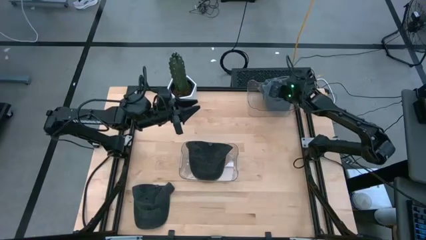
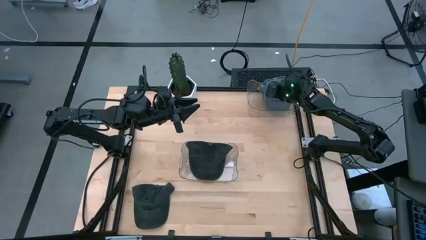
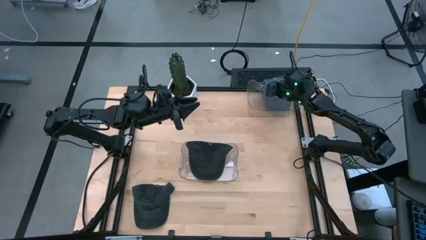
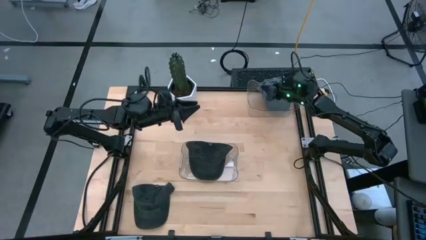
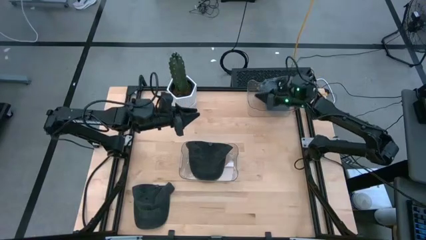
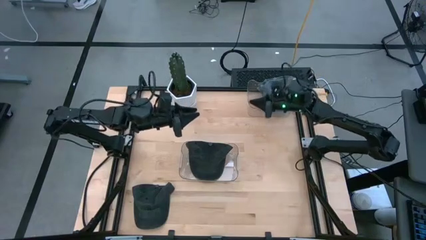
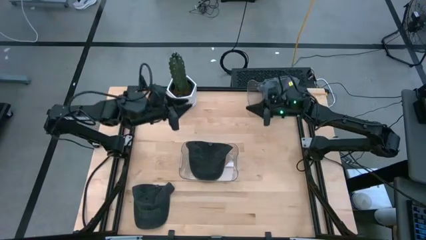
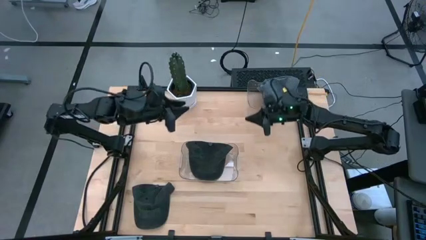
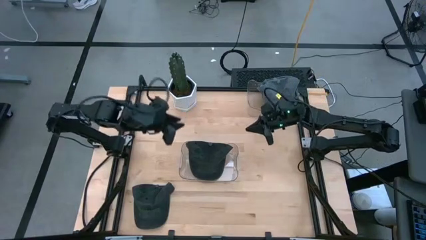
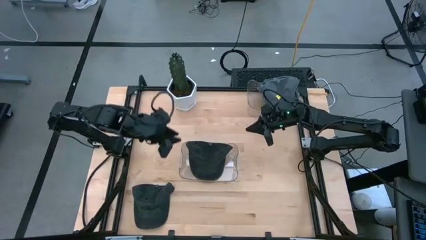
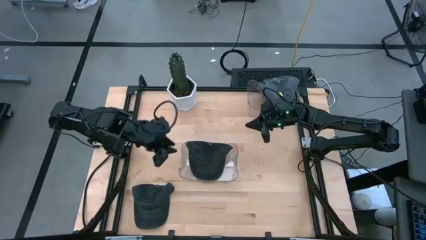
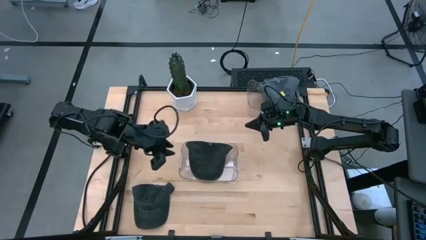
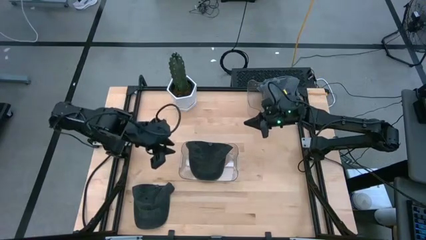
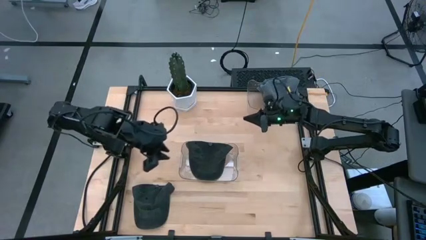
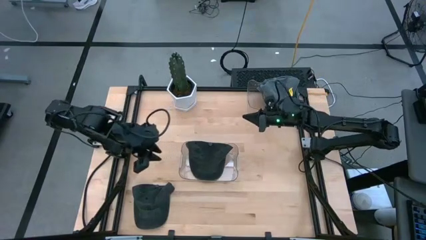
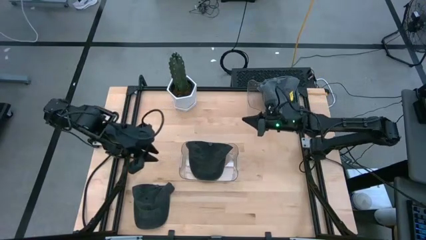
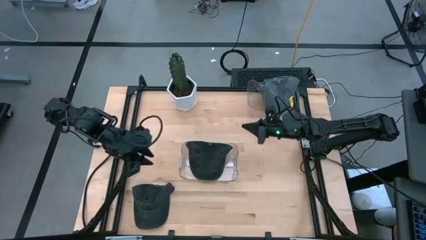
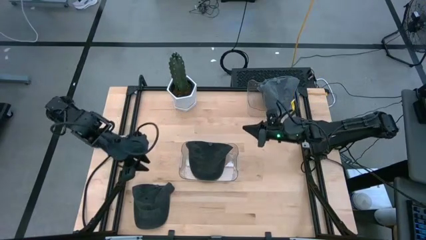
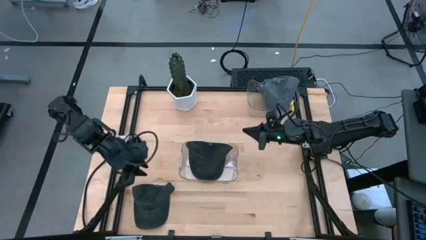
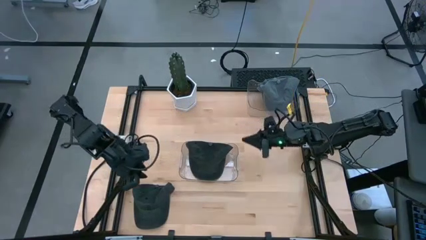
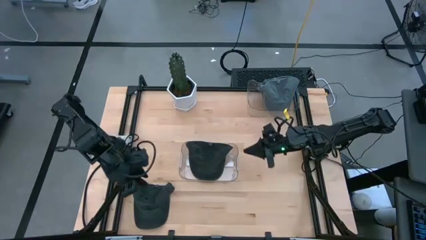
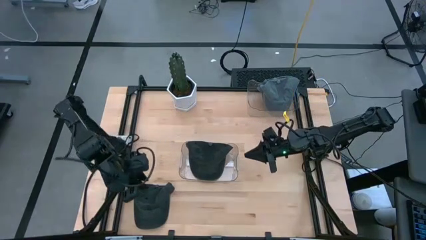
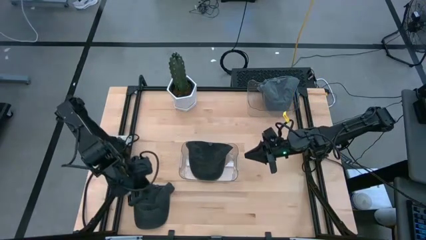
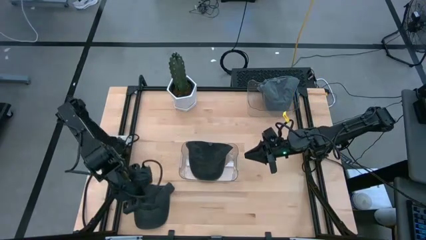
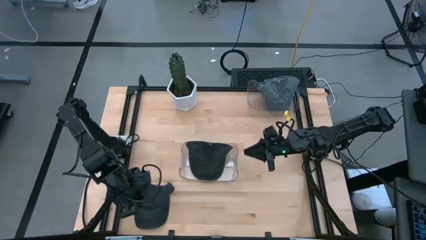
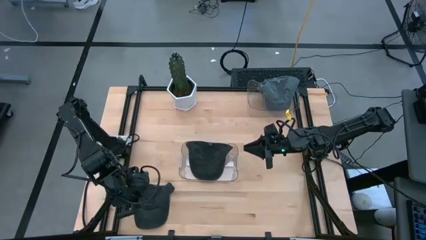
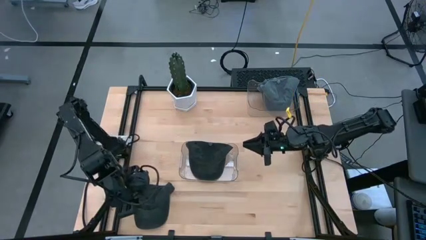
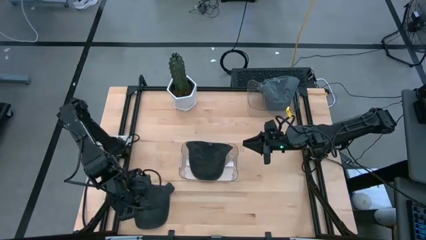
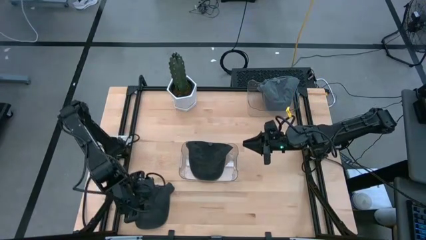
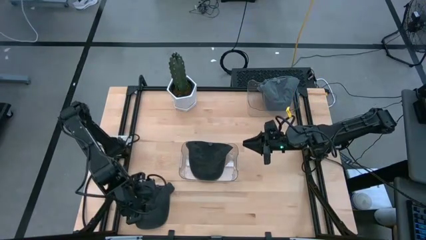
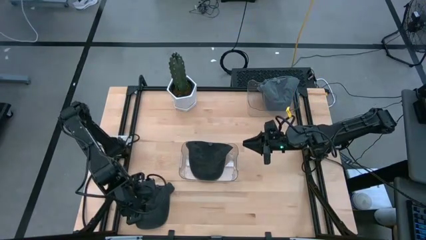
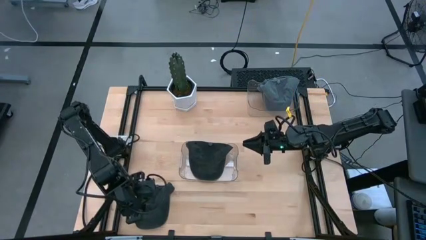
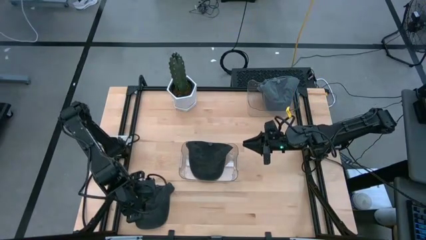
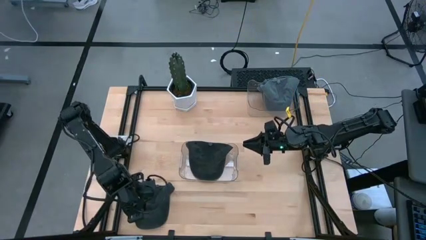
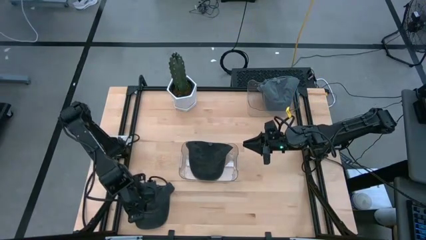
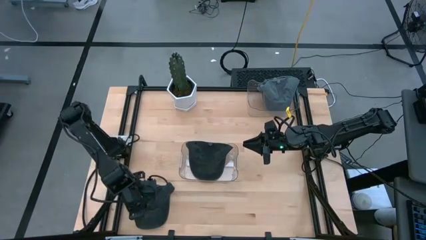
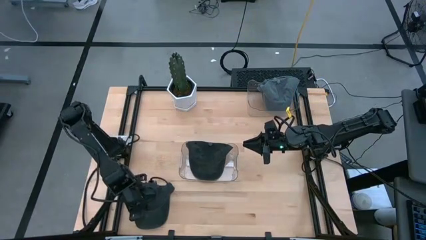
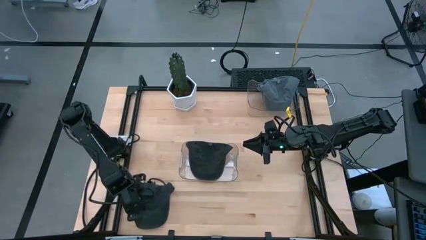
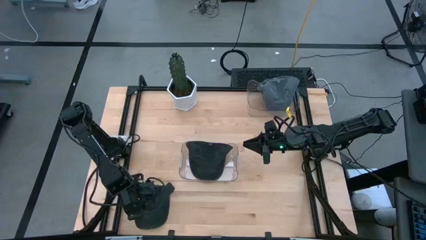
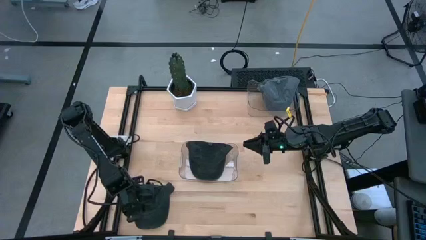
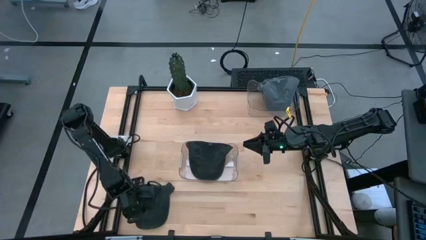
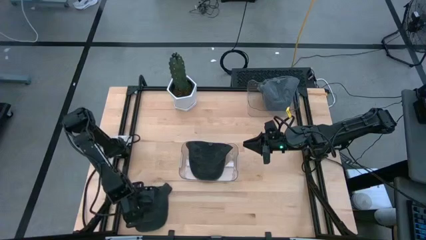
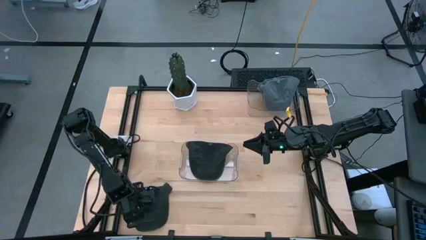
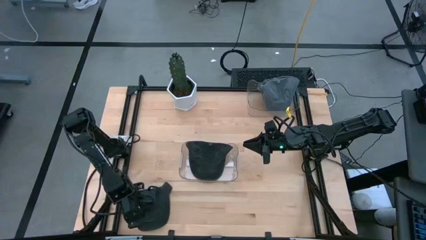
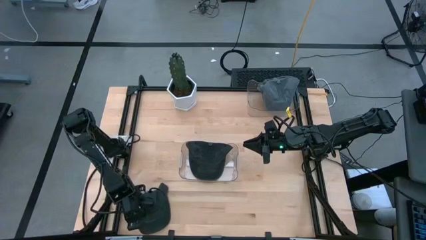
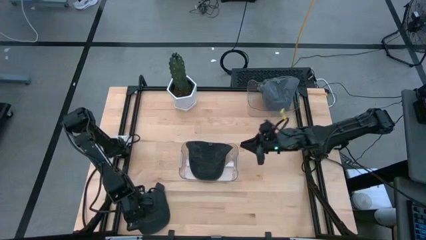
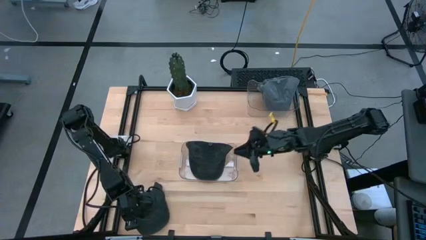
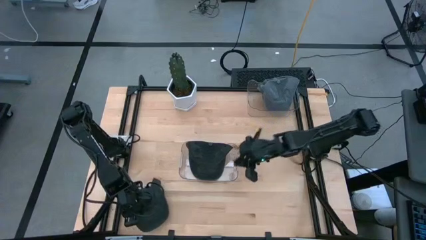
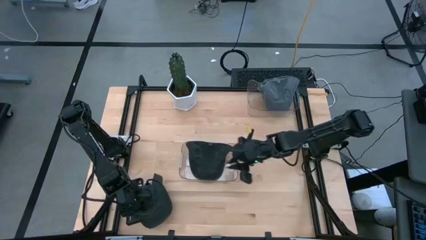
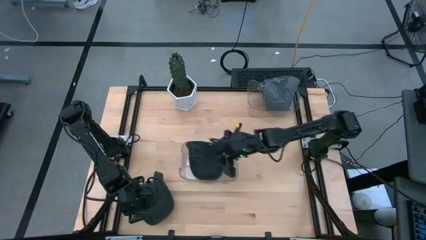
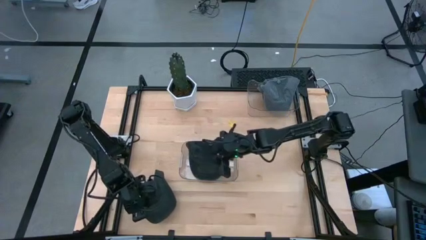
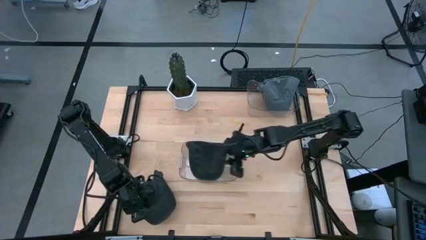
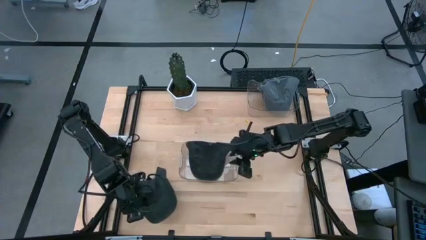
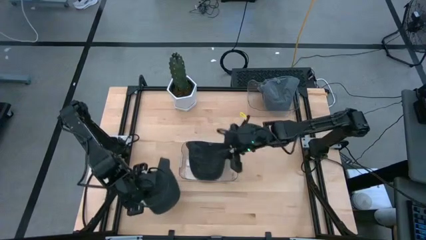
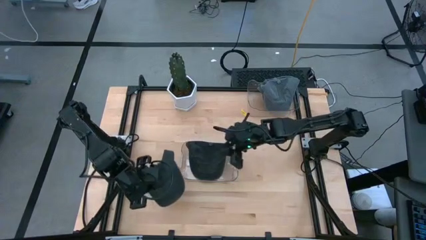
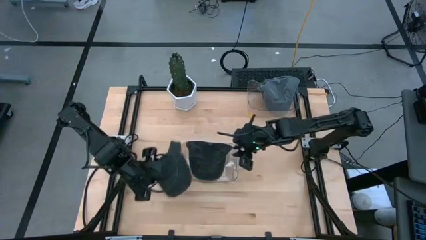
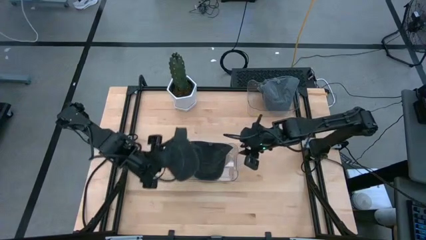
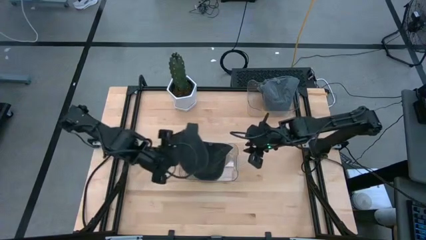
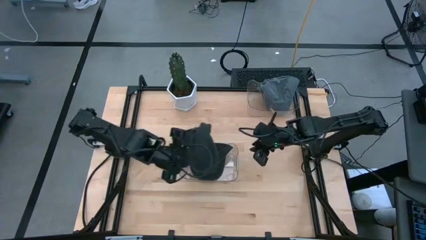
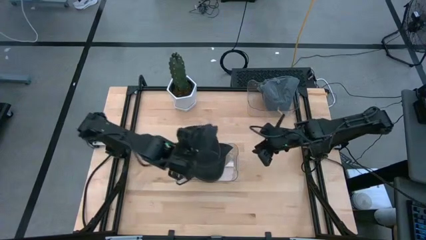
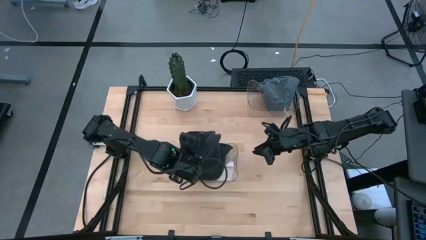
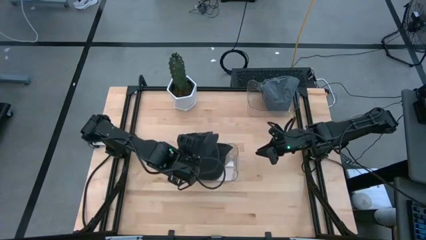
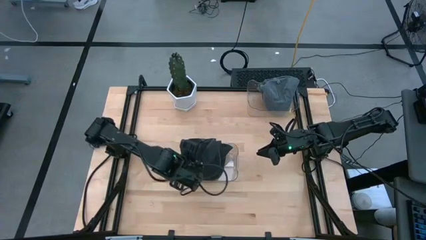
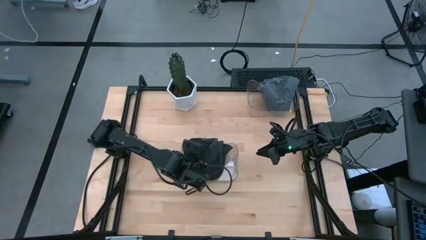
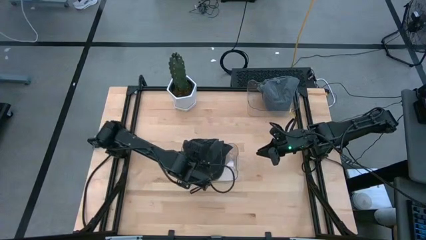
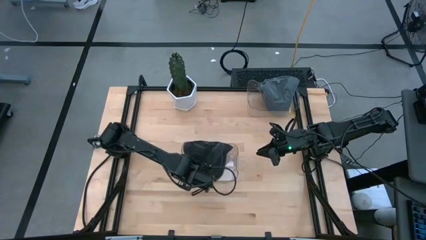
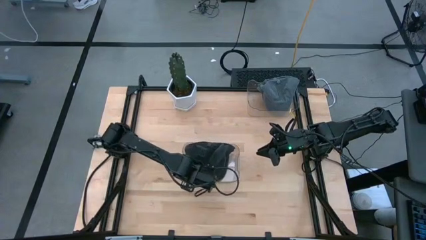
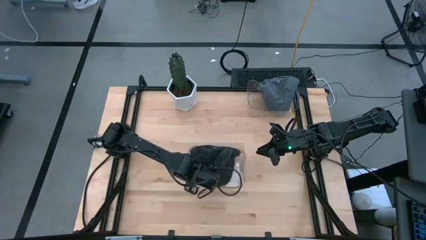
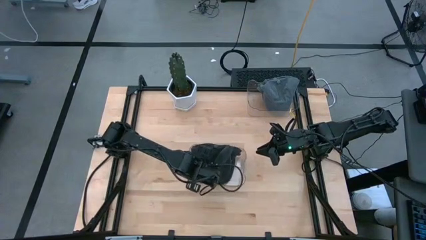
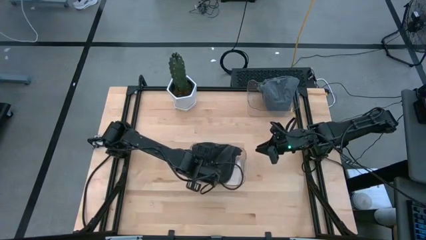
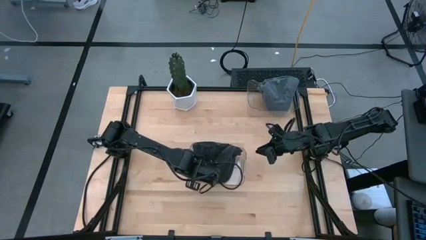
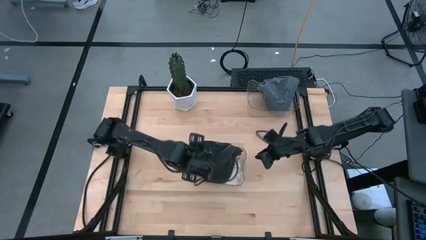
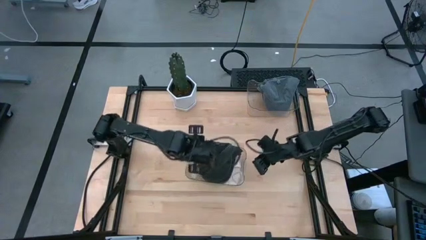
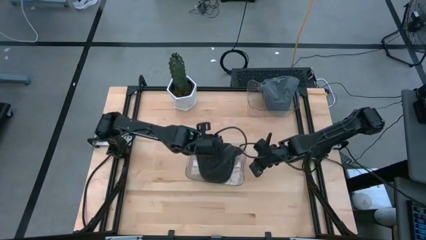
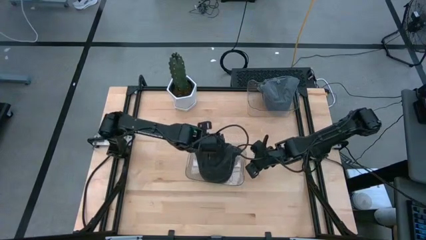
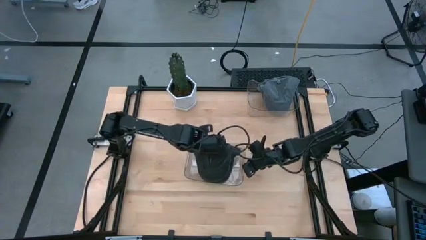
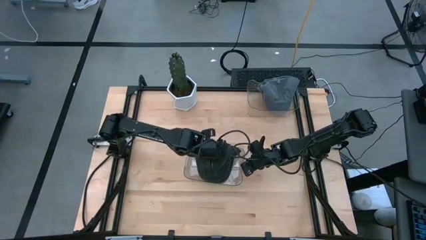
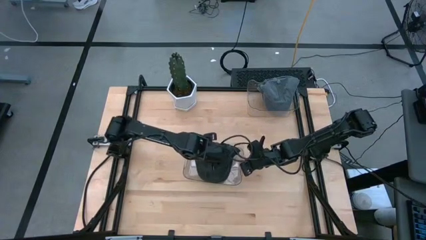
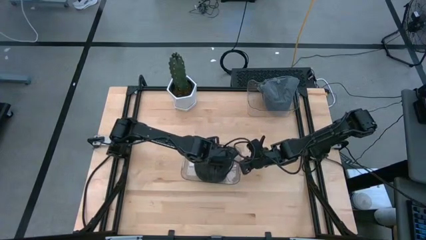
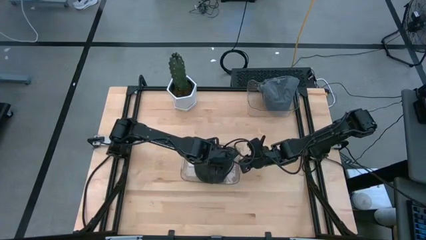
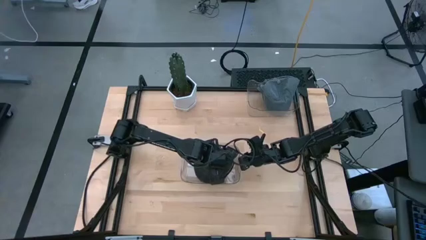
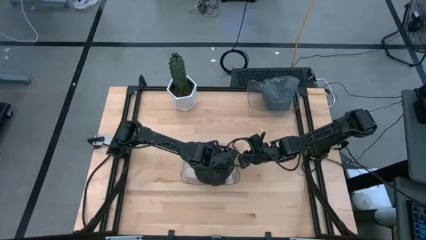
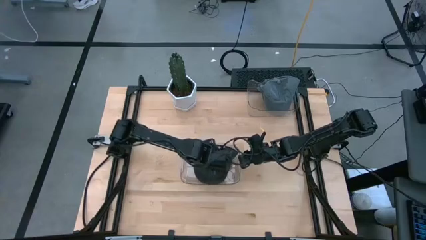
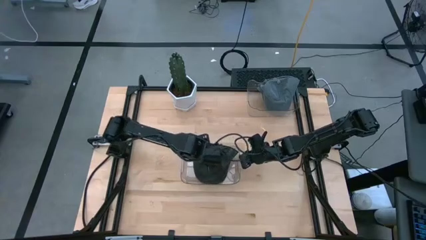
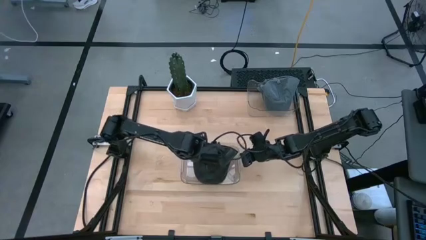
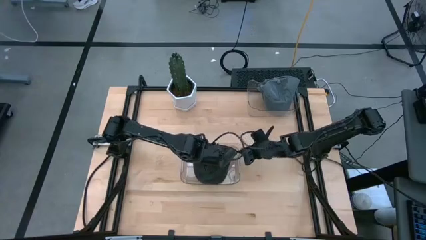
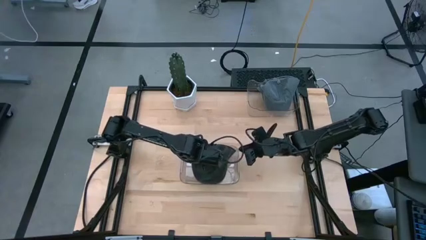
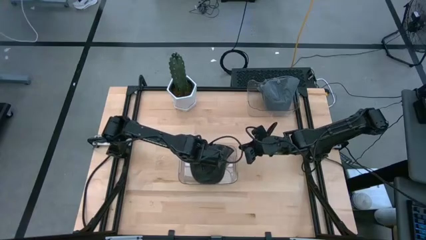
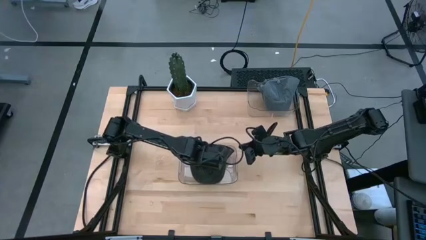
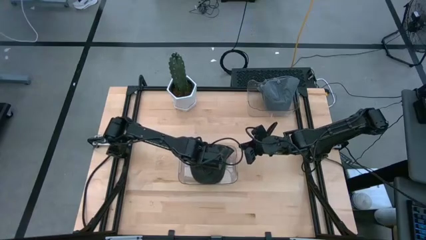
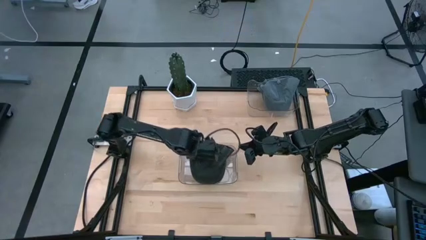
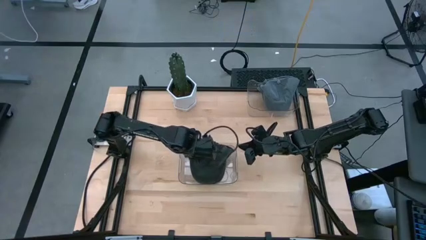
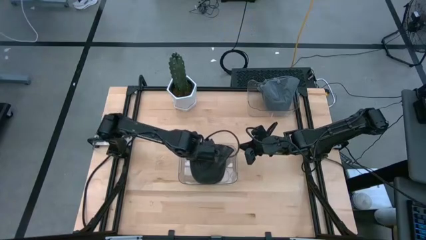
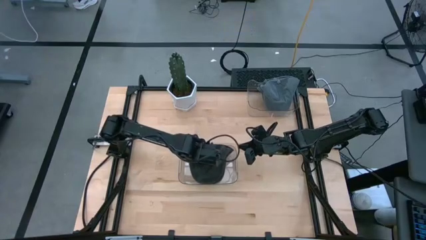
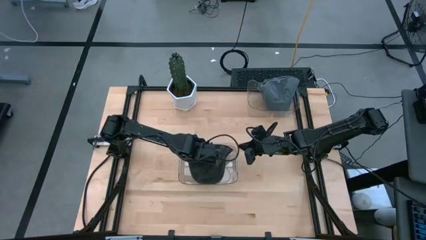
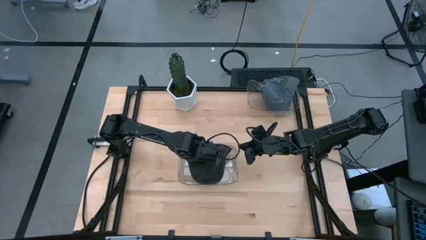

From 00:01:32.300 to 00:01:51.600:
Task: Pick & Place hat
Put the black cap into the bottom transparent bin
